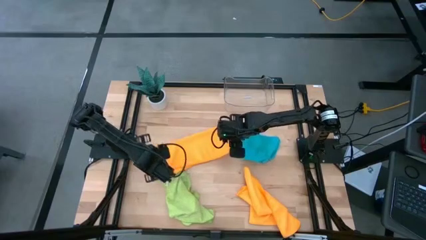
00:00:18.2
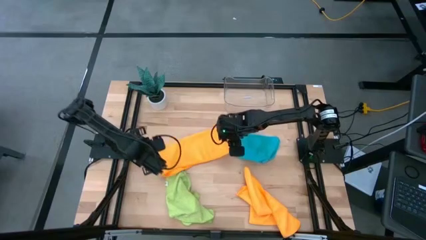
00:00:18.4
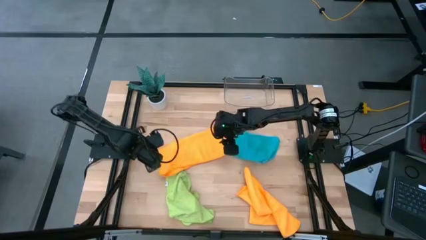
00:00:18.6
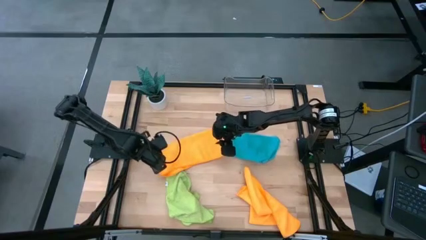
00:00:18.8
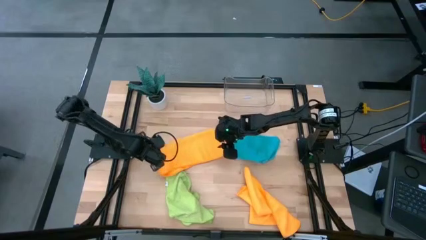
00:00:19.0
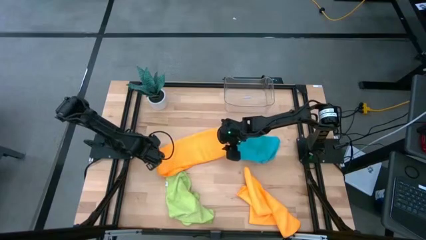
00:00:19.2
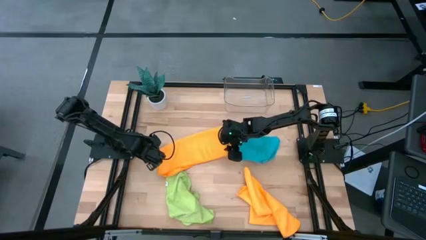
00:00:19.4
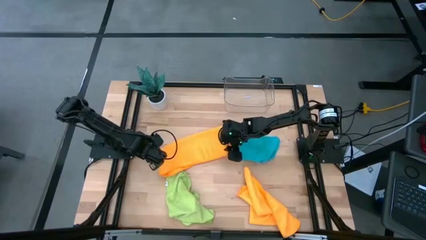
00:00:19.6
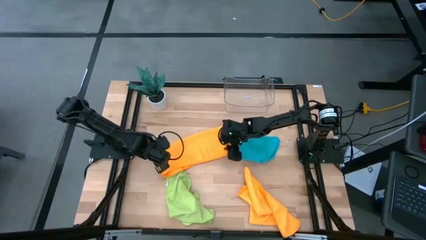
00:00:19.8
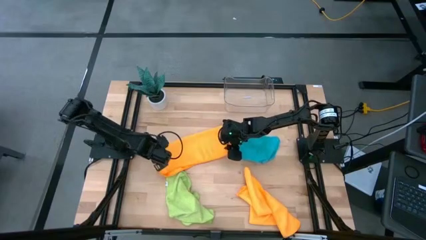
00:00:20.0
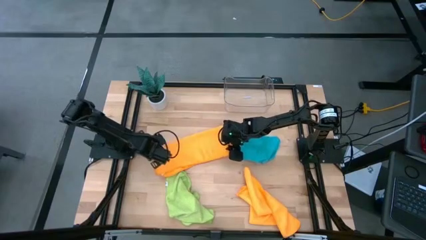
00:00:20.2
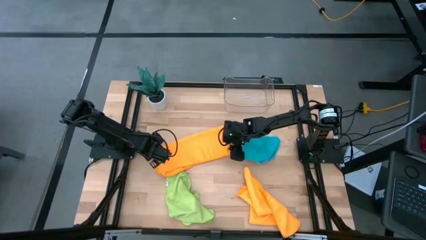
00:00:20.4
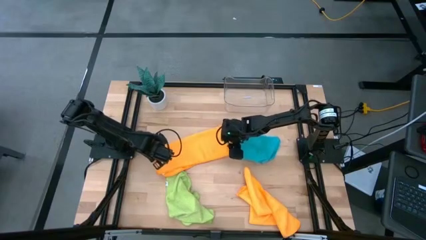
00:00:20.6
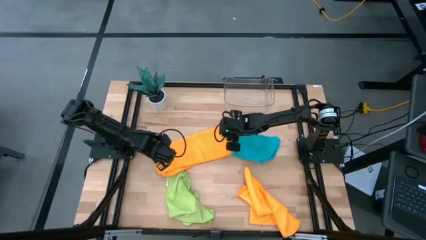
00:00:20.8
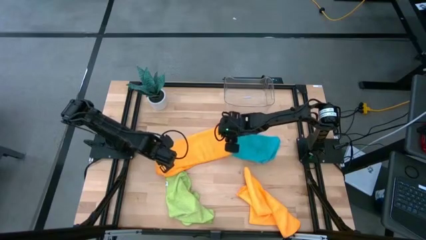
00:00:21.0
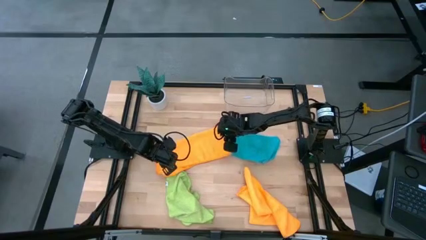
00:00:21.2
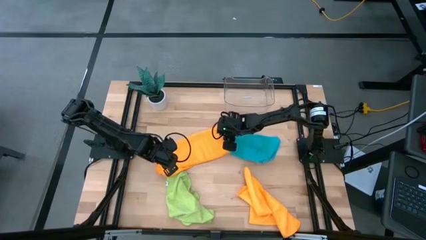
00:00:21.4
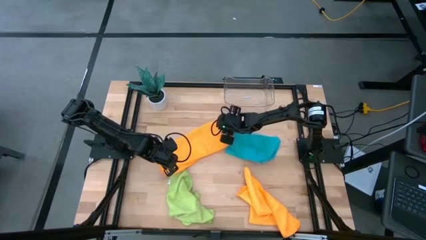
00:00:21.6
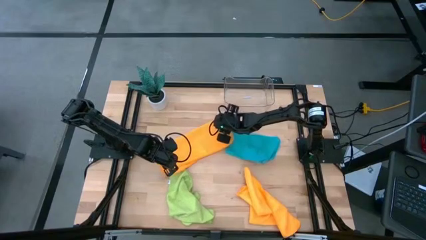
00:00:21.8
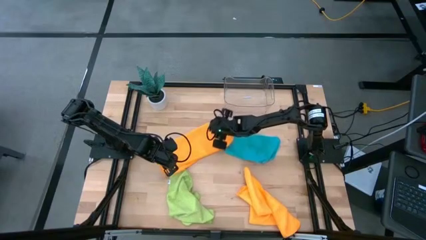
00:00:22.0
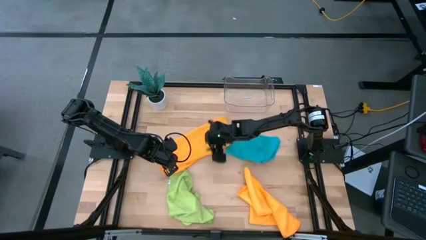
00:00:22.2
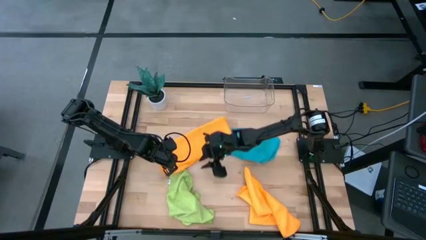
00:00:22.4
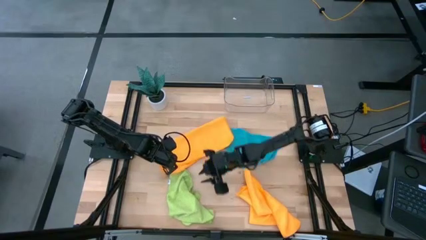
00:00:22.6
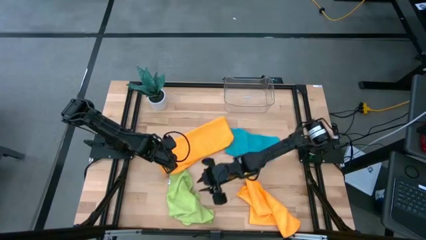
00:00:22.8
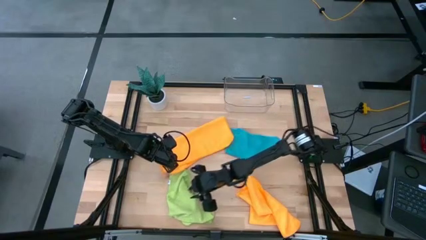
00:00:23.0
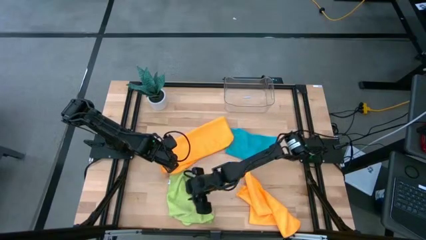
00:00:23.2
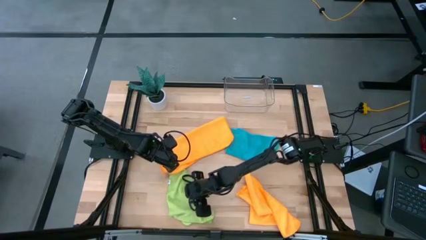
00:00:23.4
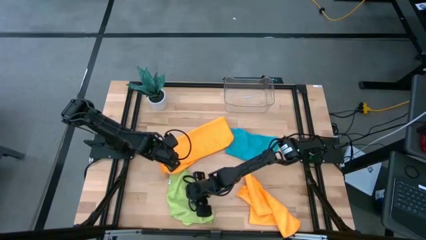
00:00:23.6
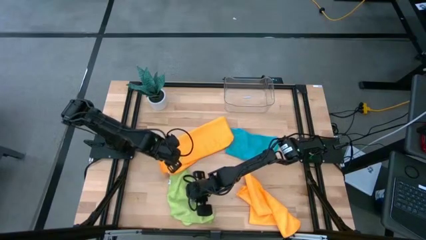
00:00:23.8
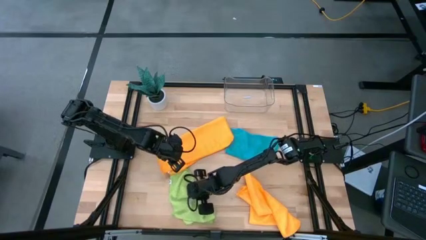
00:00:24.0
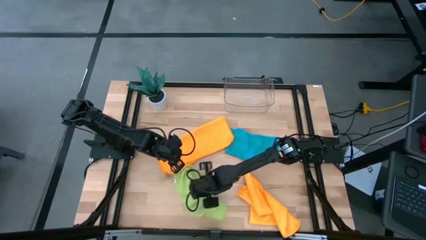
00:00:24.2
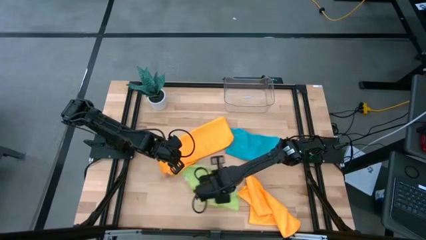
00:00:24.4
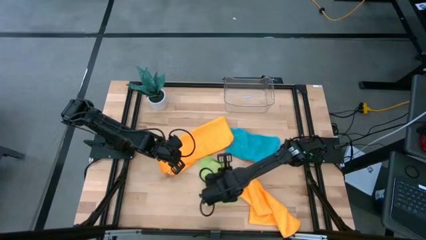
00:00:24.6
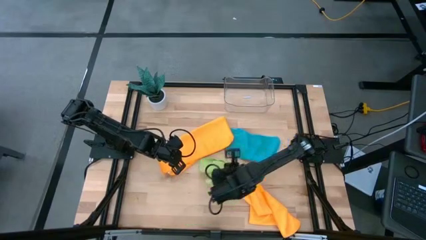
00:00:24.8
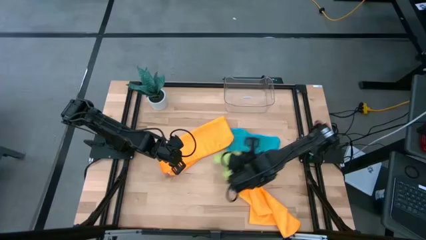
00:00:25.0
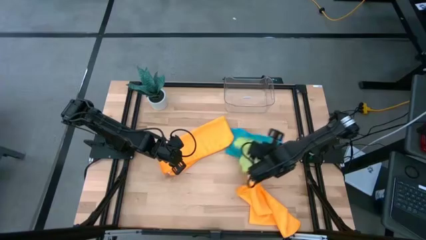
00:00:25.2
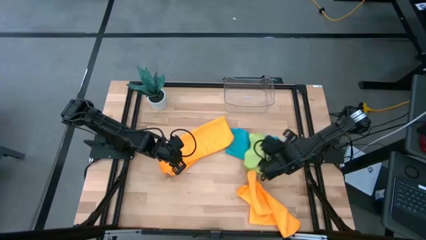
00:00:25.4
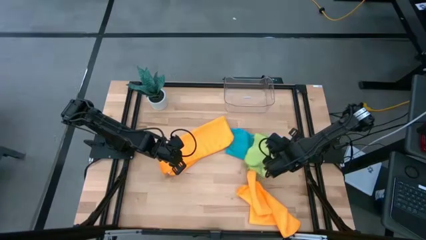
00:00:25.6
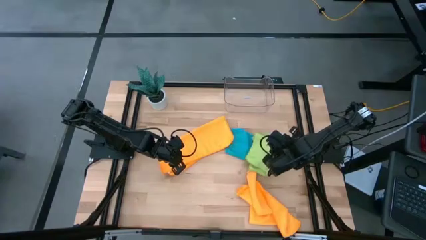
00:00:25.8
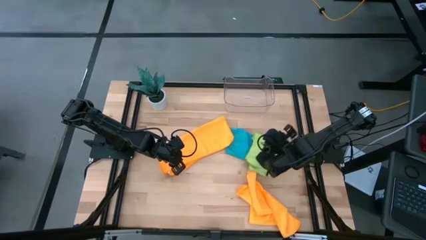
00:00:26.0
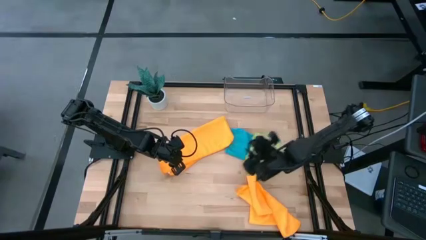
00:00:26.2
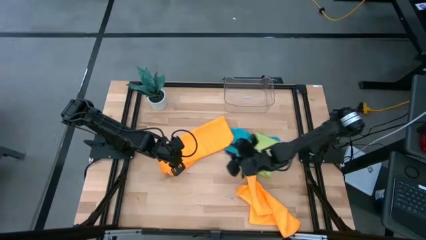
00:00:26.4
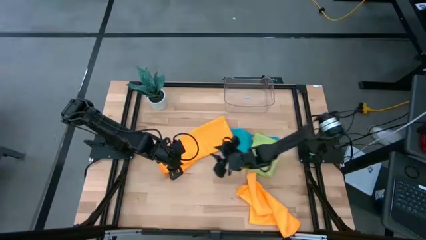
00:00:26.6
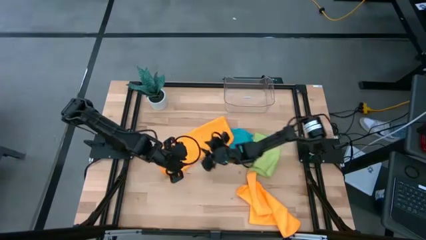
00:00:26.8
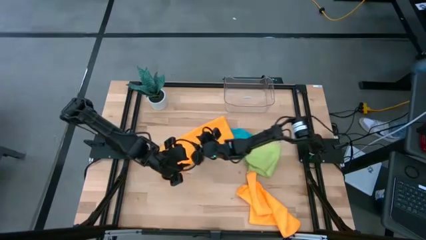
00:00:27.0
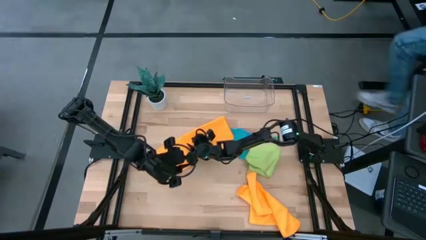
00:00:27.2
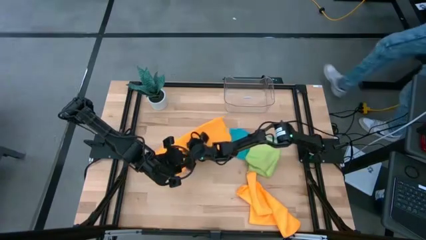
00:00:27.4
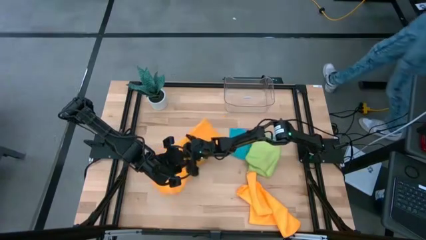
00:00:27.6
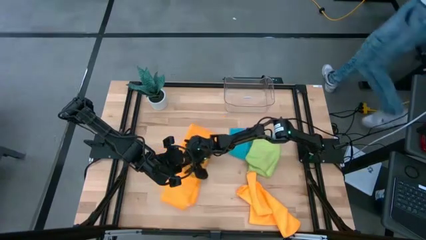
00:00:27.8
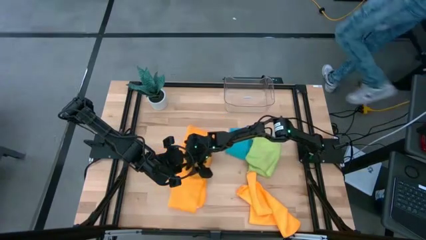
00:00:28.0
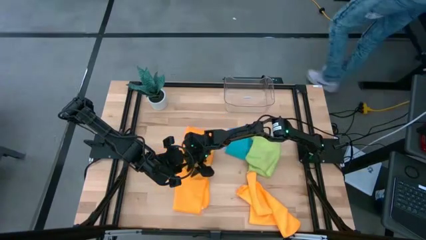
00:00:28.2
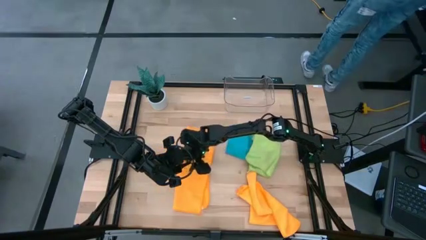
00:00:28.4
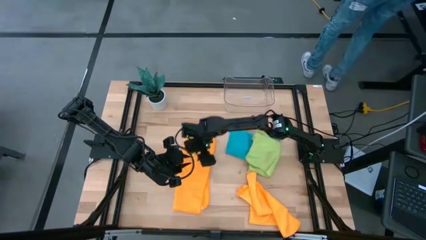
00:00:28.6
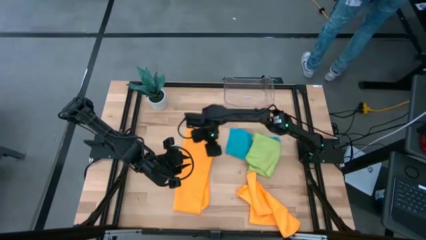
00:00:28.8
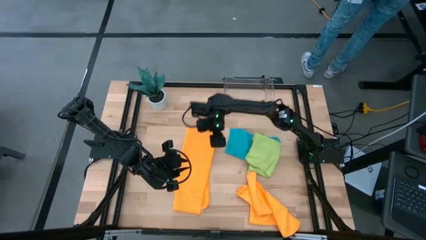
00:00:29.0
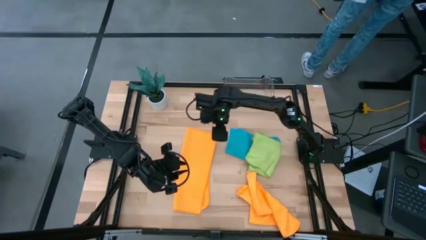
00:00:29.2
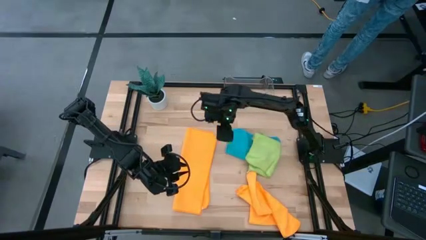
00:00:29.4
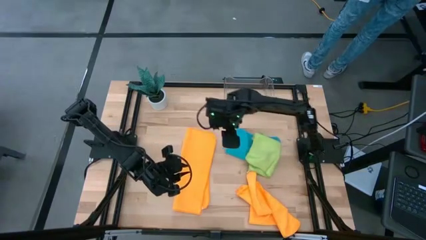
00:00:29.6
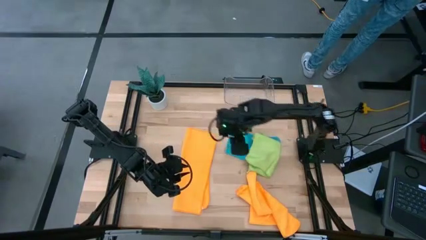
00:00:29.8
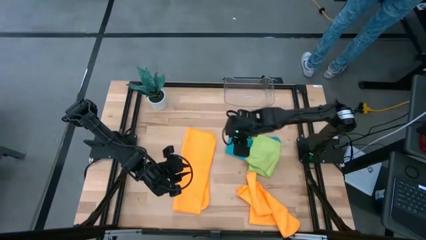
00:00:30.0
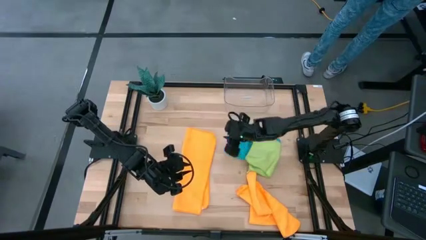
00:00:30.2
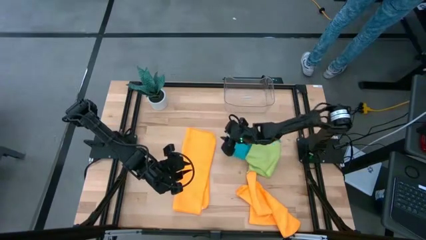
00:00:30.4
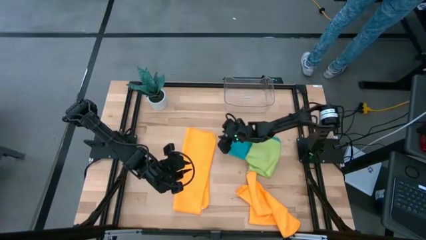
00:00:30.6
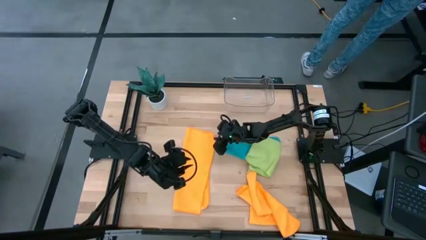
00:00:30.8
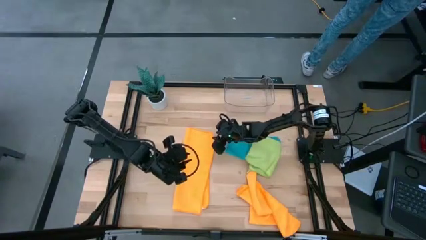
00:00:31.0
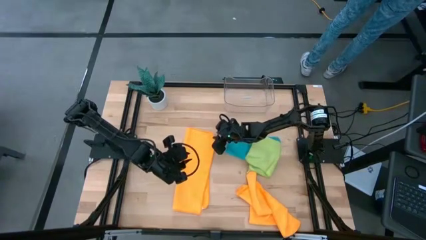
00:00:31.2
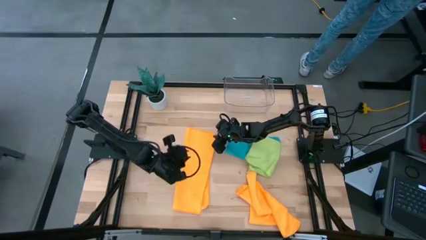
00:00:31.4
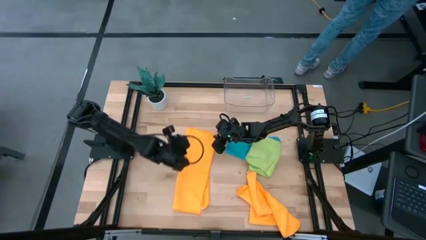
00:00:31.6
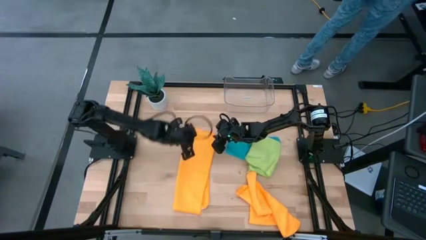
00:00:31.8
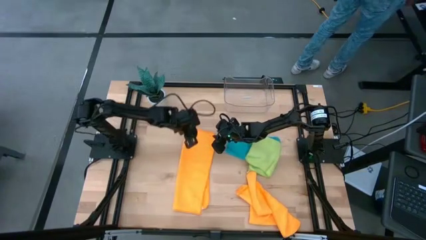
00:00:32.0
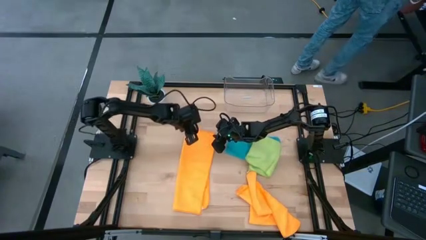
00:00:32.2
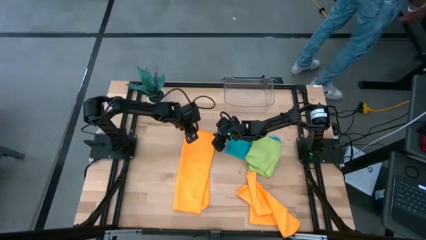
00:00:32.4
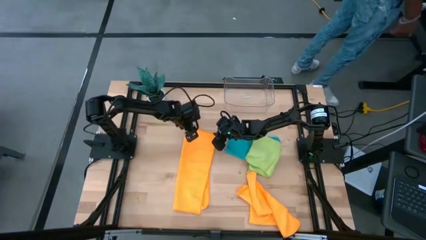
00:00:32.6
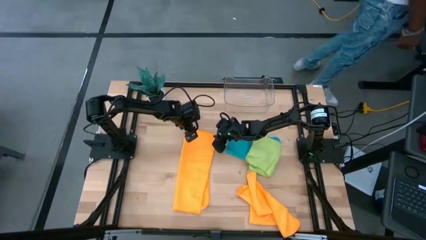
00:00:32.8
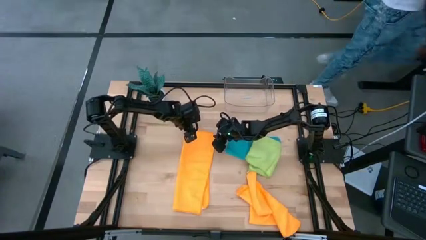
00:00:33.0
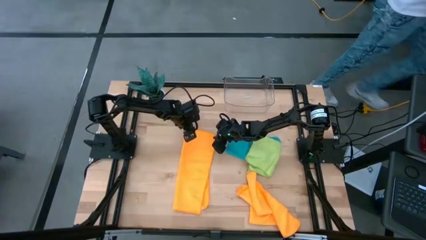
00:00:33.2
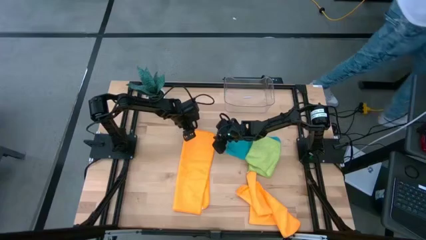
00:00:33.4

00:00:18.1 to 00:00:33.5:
Task: Fold microfiber towels
Fold the top orange microfiber towel
